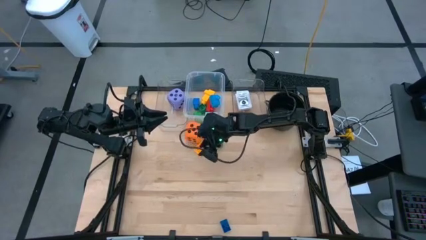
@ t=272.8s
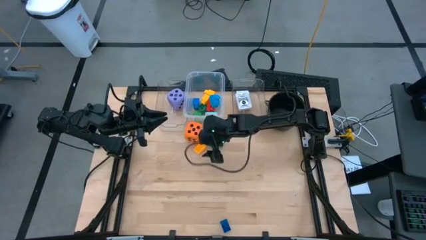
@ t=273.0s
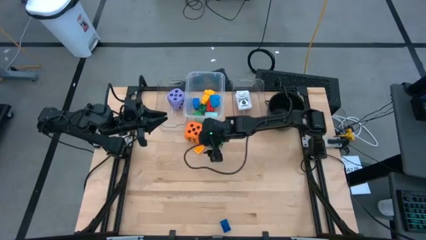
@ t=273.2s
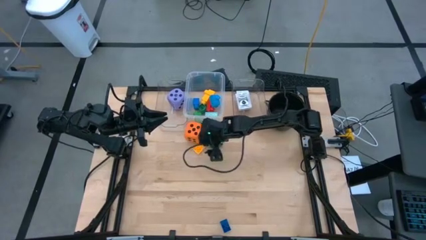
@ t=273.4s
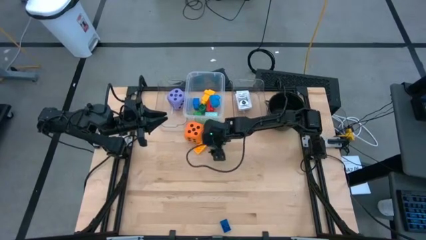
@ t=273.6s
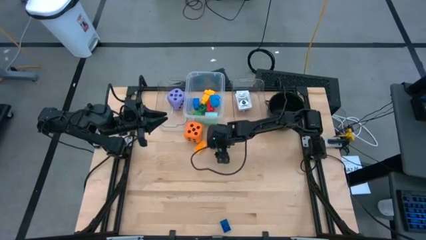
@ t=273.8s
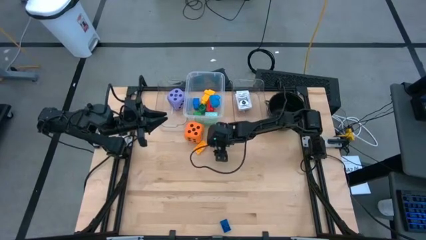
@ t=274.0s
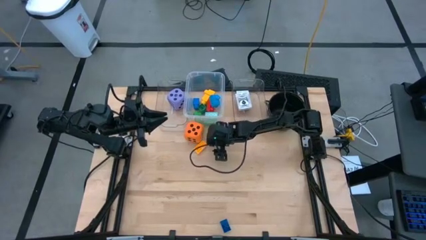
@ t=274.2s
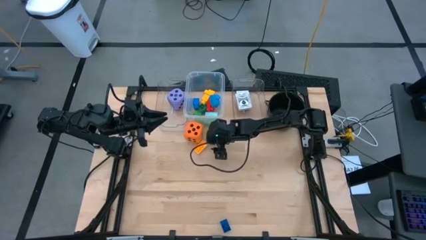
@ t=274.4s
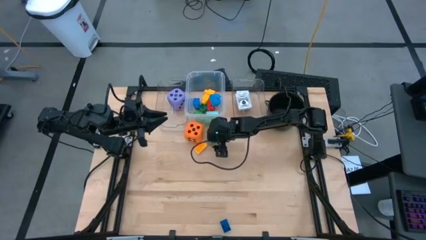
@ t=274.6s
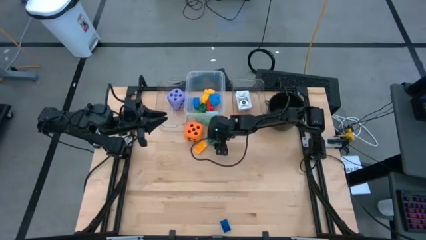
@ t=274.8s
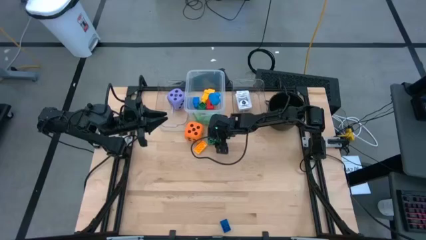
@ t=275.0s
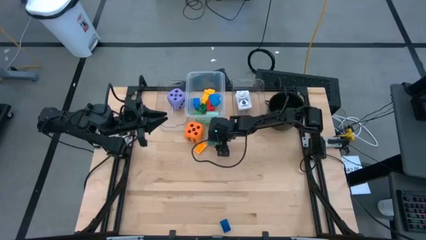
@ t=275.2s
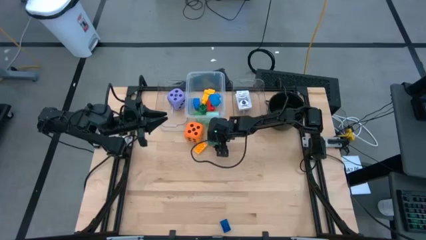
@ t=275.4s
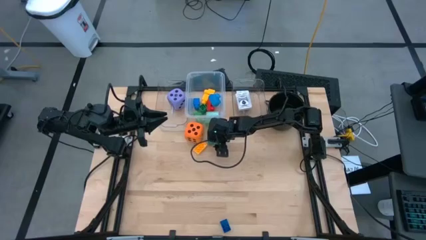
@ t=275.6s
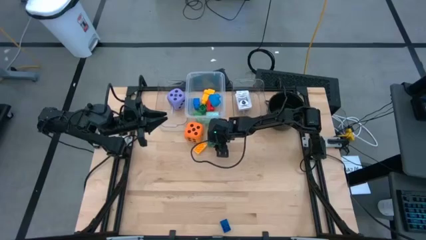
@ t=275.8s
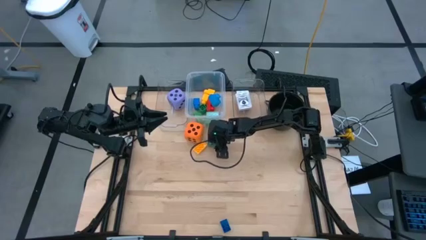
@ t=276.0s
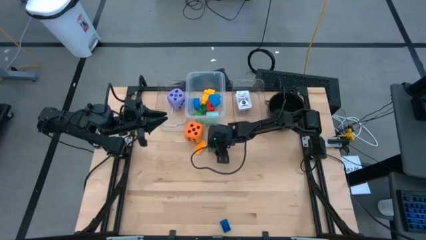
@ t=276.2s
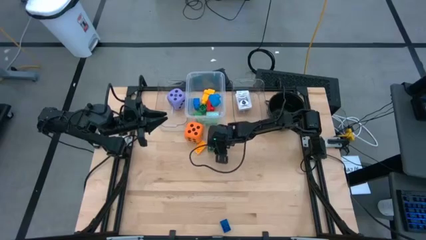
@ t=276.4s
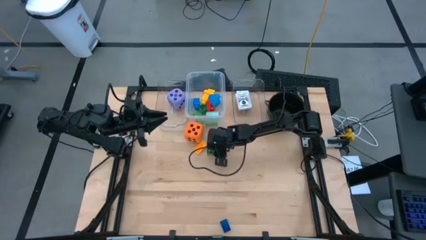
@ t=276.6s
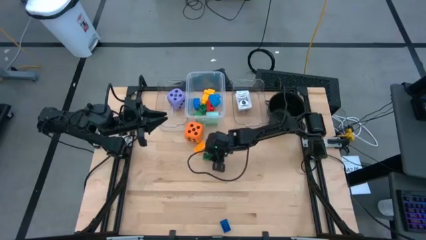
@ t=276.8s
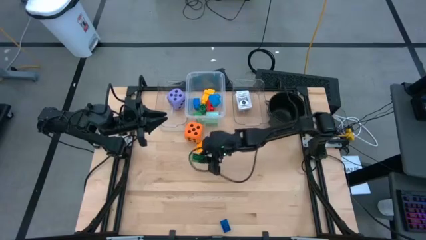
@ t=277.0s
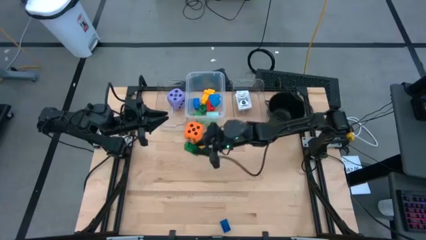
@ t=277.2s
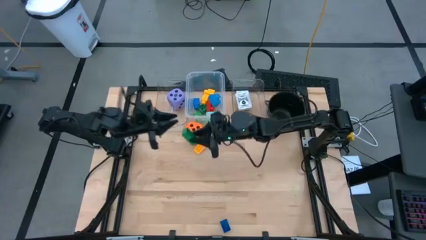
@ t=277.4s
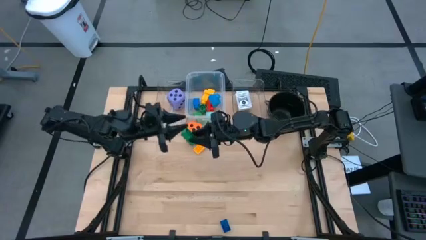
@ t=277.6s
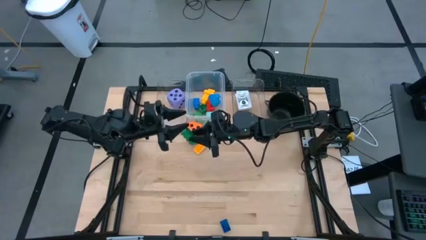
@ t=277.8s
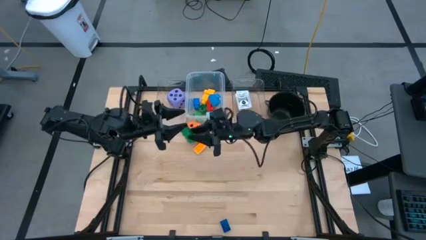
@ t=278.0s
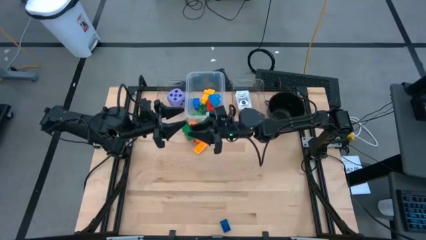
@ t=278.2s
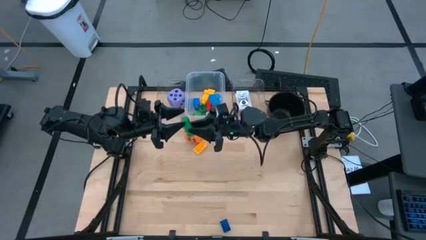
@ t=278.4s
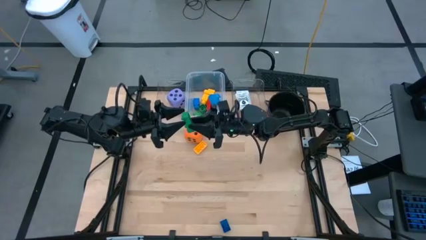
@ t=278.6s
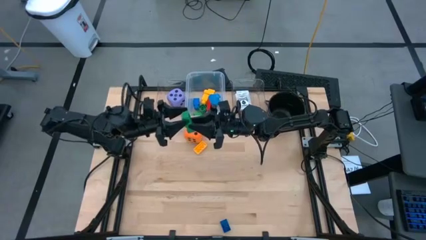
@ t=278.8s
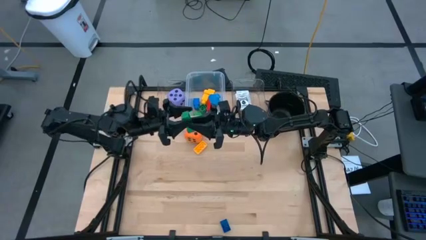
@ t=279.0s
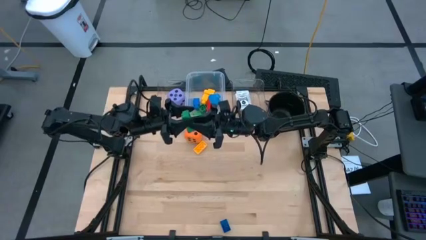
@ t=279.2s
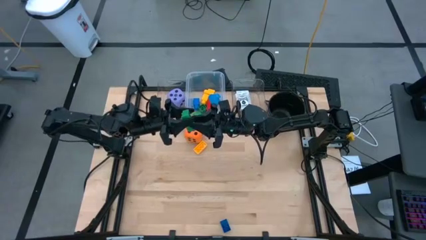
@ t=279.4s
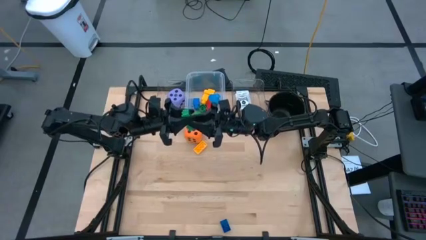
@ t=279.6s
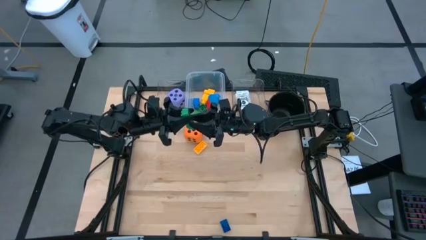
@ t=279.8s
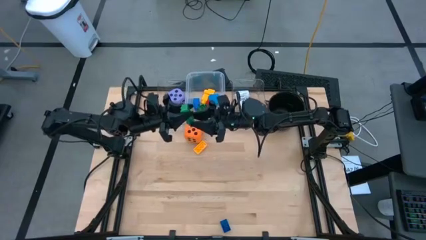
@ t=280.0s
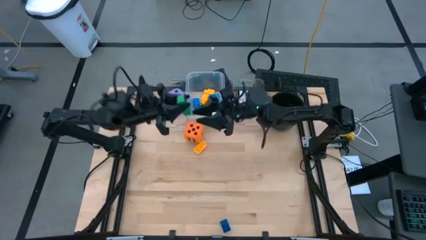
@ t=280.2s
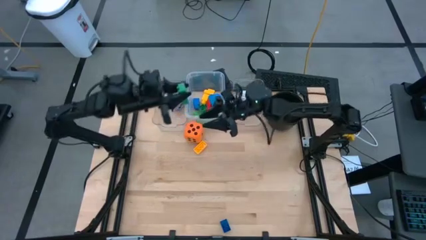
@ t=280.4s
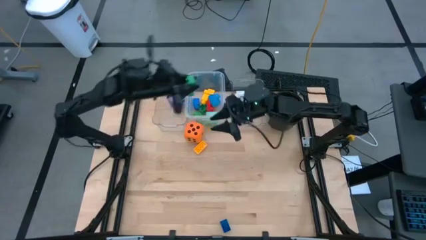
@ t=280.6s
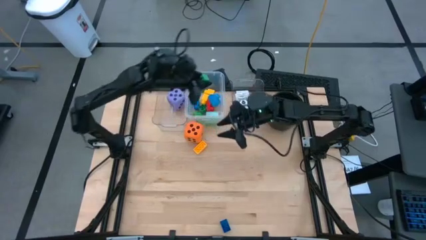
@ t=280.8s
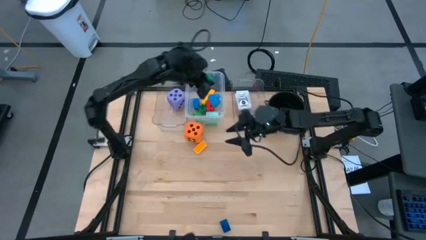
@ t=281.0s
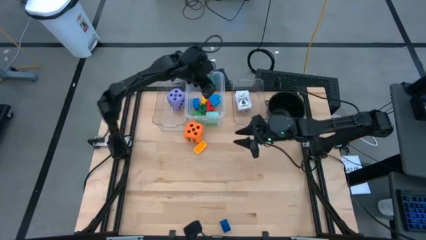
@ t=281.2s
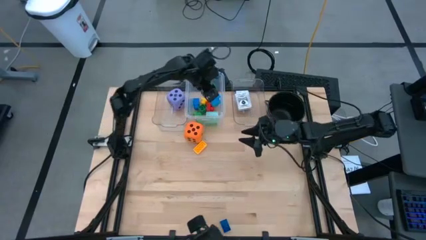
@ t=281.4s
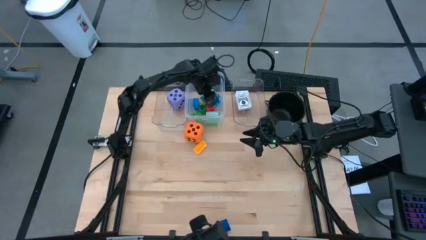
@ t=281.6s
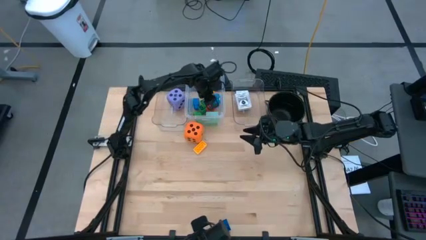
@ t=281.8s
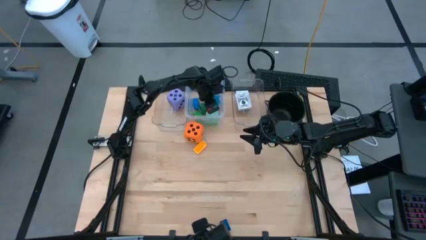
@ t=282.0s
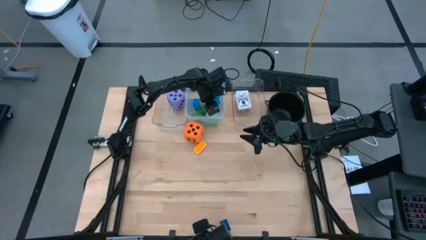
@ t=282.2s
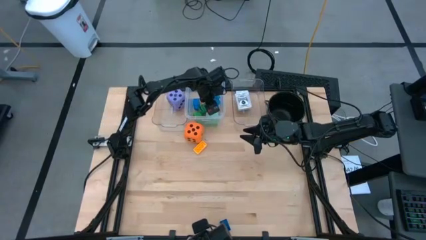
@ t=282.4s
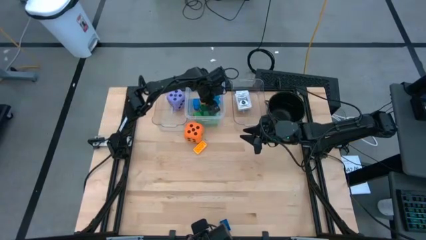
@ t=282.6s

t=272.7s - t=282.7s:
Task: Pick & Place Toys
Put the green eight stud game piece into the middle transparent bin

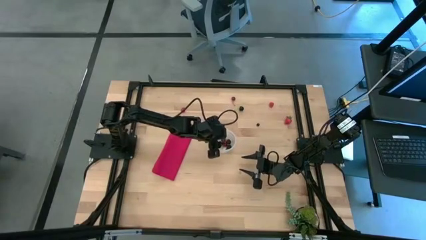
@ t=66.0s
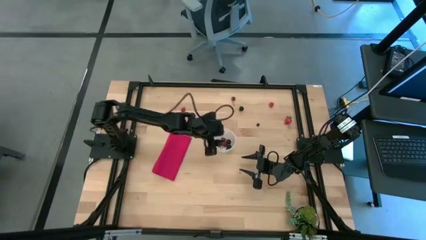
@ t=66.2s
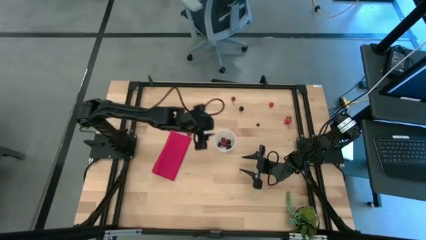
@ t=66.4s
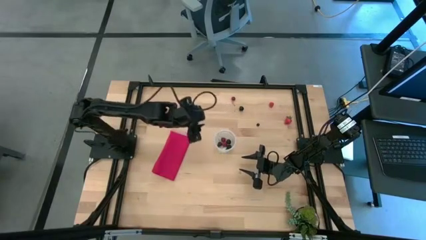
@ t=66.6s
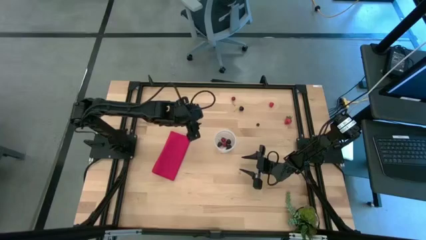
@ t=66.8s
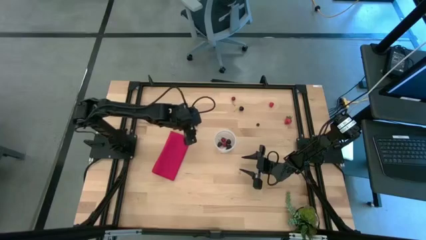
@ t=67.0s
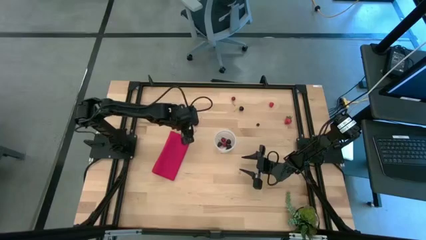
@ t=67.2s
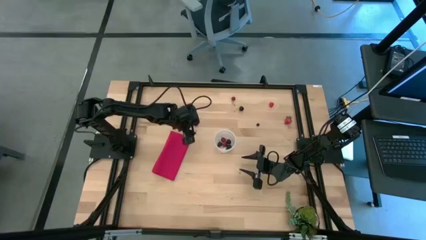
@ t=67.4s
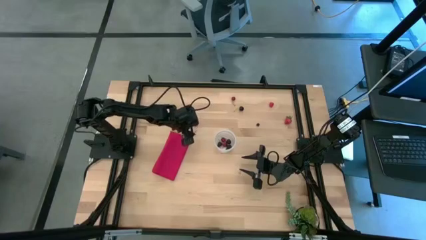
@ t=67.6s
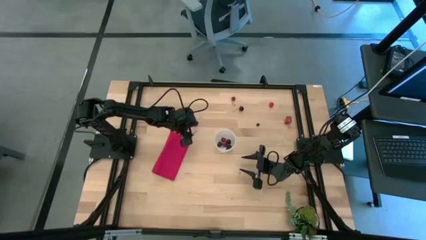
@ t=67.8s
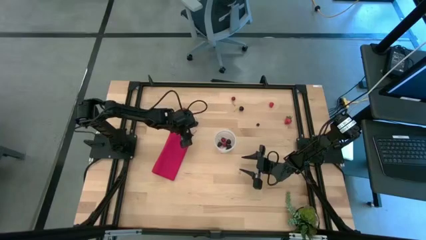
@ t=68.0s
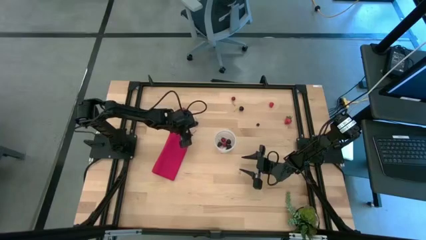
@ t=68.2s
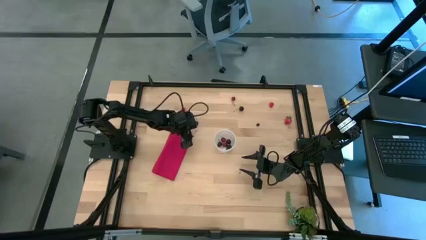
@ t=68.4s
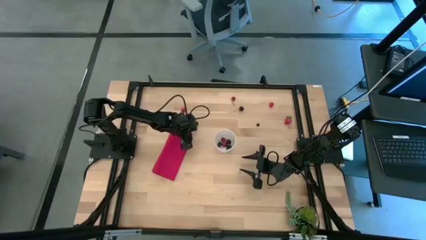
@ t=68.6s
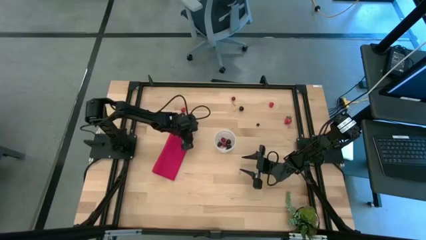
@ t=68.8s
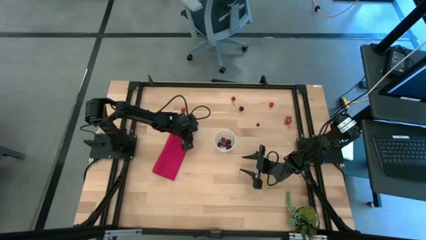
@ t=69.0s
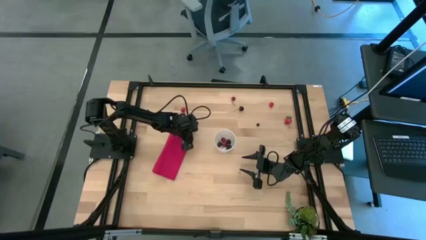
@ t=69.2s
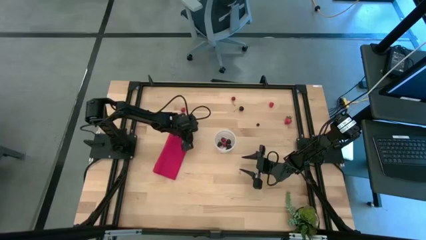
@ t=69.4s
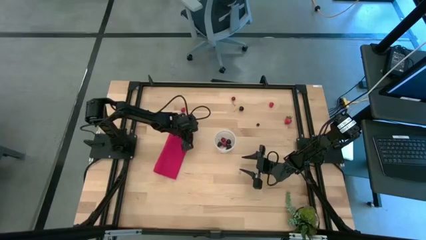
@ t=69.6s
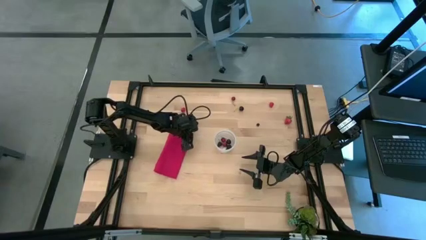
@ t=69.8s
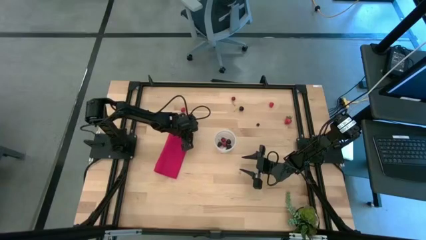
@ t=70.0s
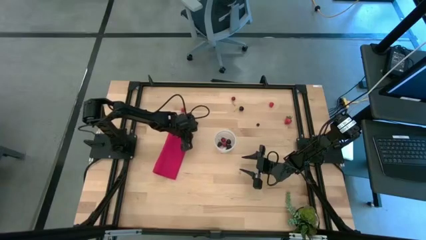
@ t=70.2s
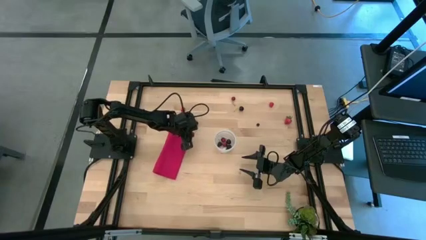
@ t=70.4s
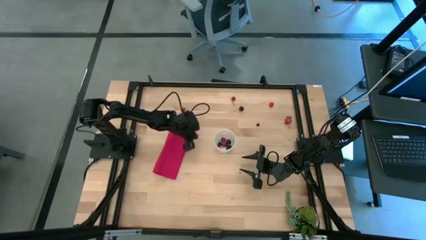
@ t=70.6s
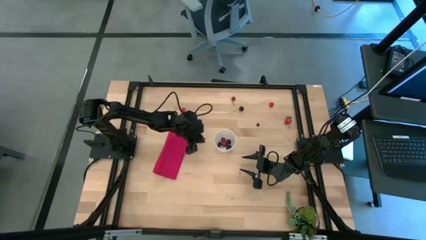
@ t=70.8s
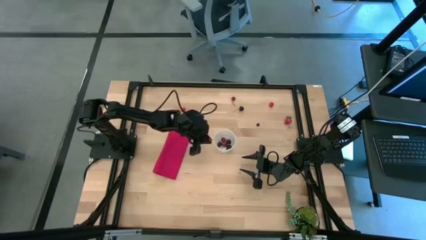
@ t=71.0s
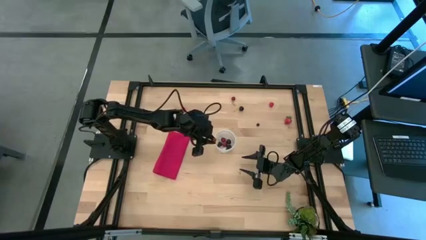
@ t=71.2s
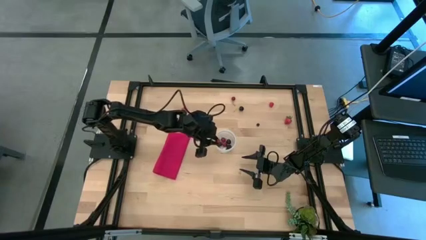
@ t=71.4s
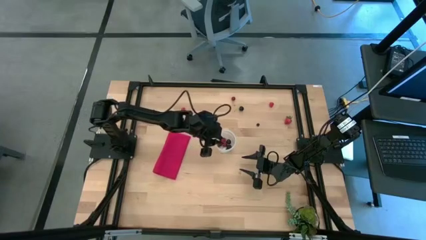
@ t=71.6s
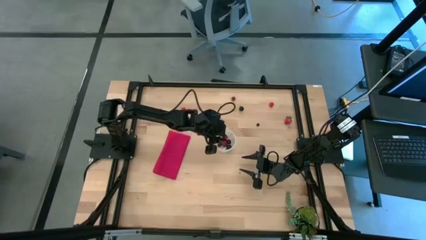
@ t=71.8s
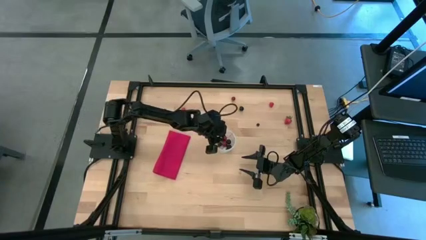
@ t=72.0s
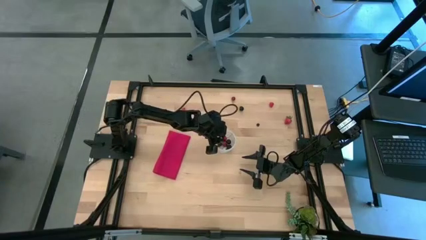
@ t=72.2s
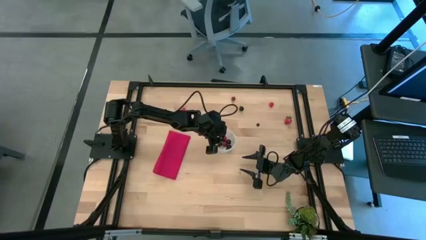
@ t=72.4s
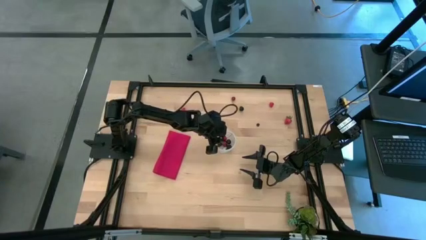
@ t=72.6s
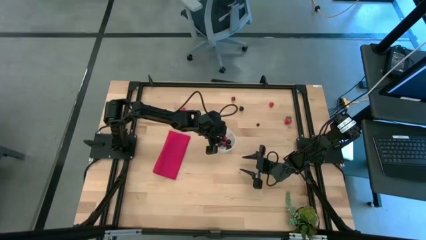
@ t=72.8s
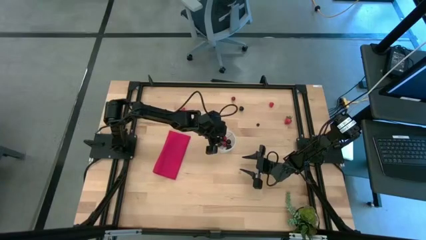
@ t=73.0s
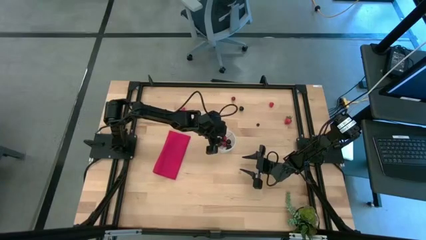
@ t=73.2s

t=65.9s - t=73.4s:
Task: Pick and placing Produce into tupperware
Put the red cherries into the transparent bin
